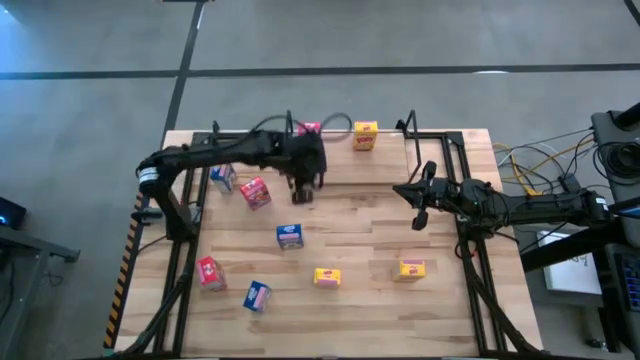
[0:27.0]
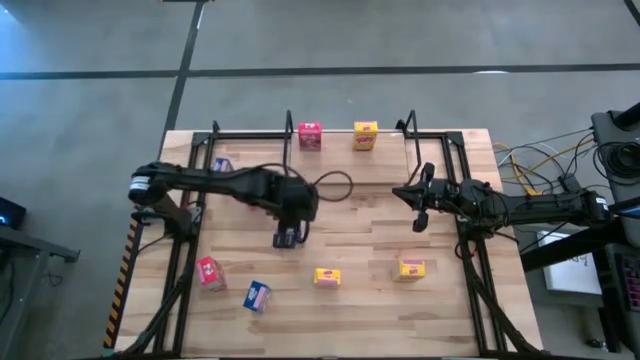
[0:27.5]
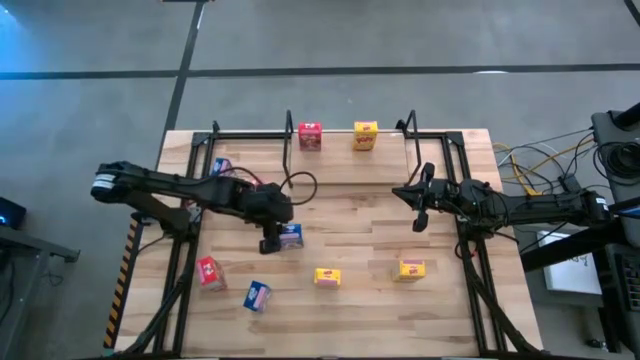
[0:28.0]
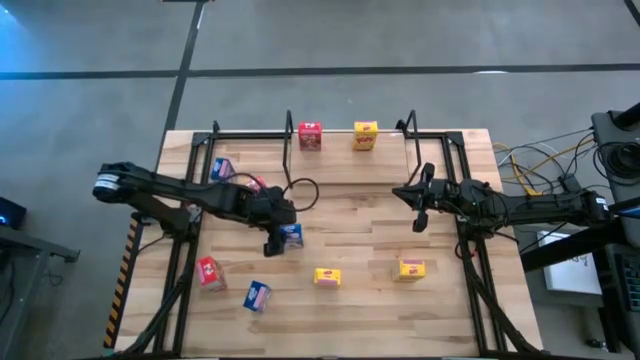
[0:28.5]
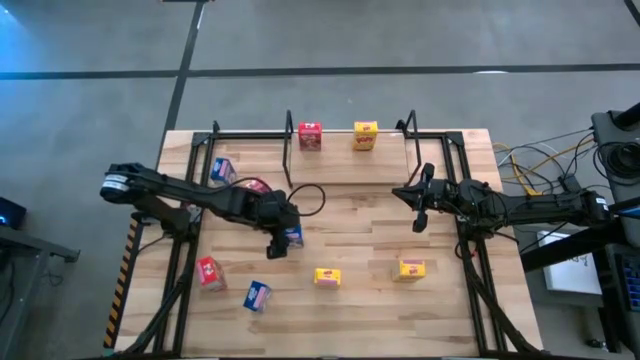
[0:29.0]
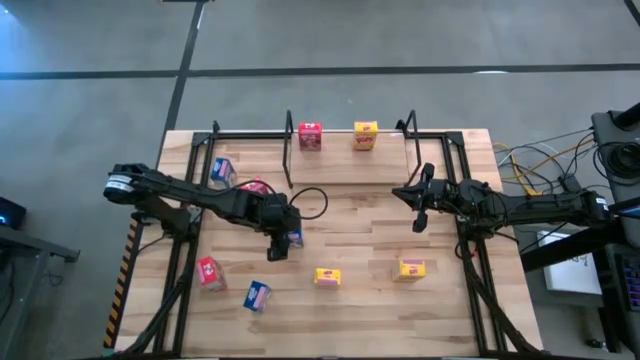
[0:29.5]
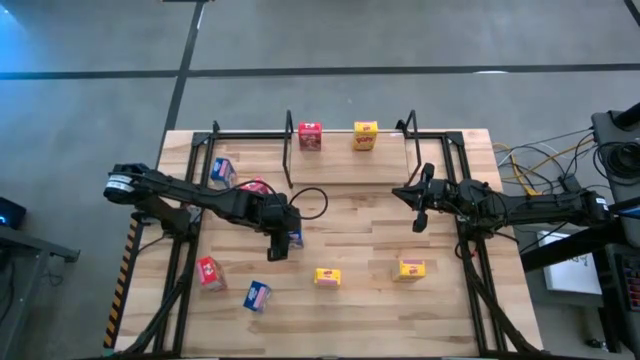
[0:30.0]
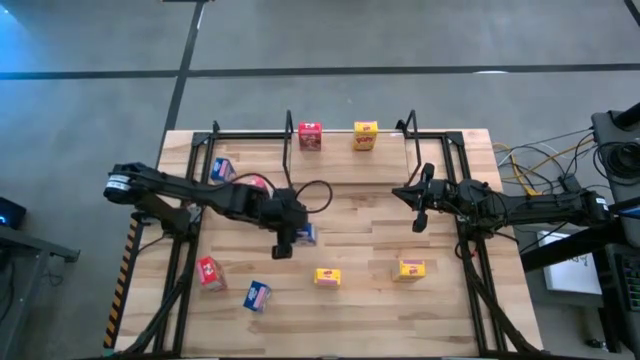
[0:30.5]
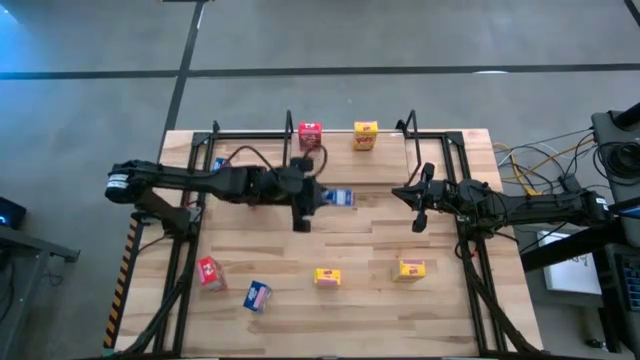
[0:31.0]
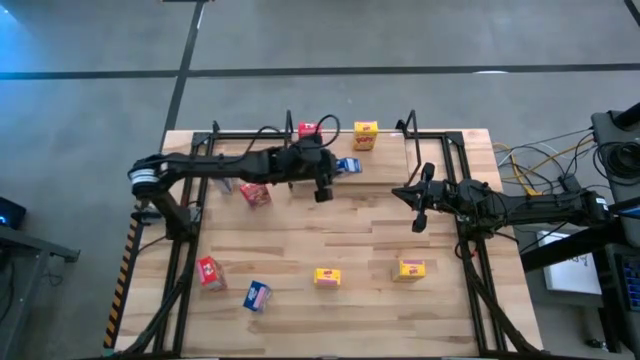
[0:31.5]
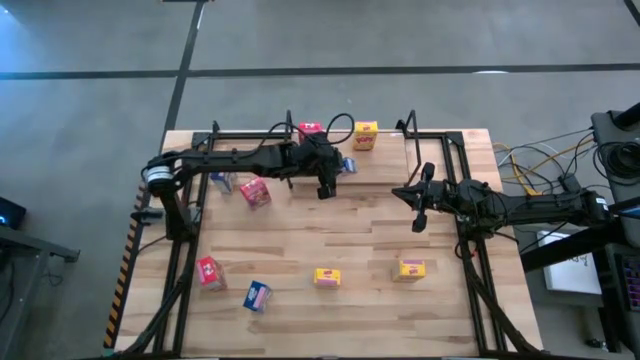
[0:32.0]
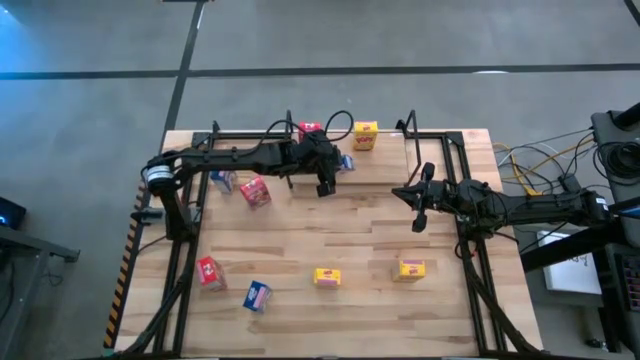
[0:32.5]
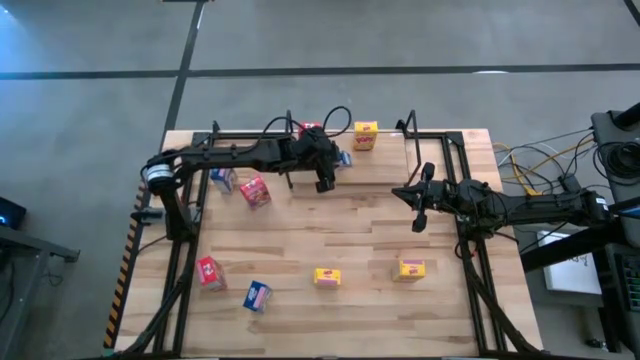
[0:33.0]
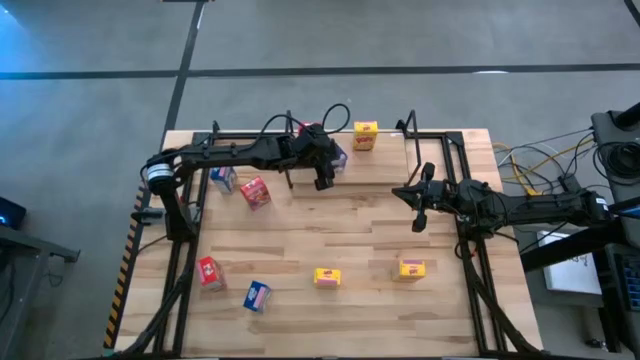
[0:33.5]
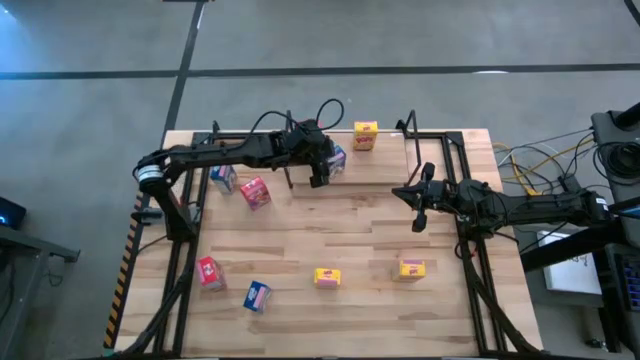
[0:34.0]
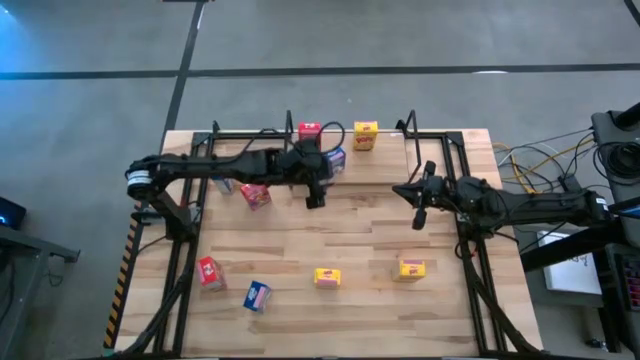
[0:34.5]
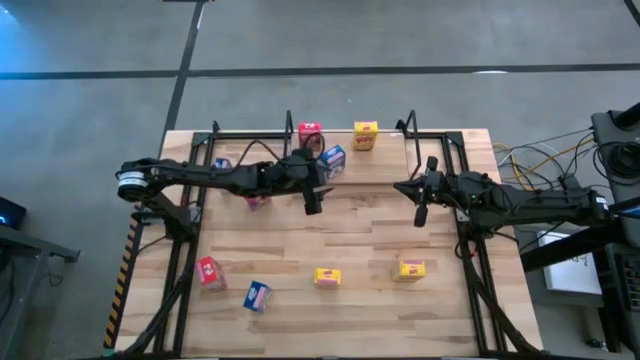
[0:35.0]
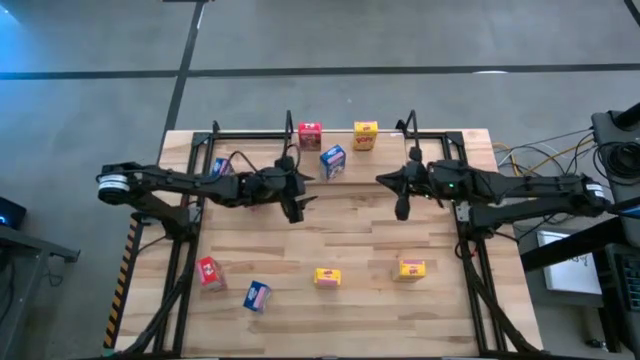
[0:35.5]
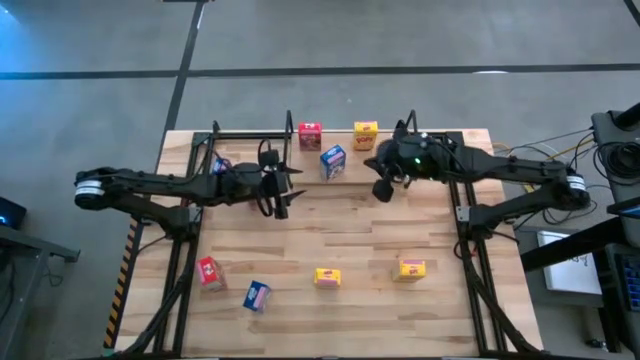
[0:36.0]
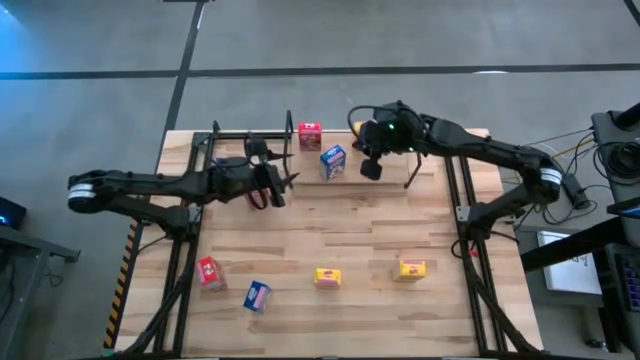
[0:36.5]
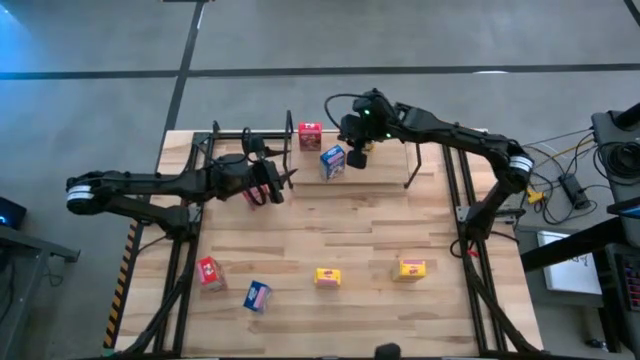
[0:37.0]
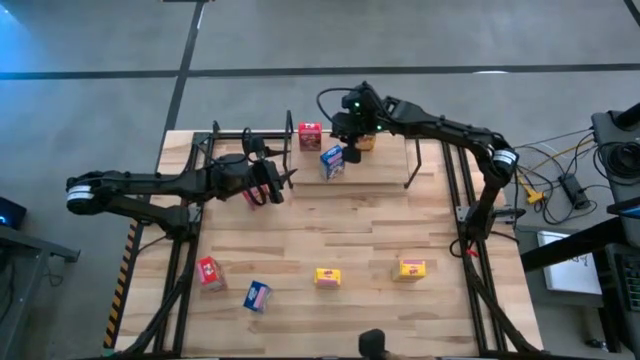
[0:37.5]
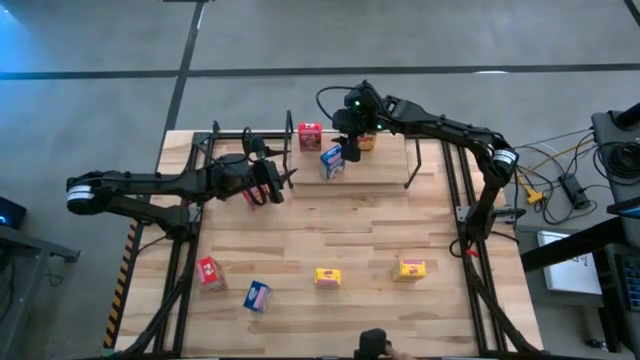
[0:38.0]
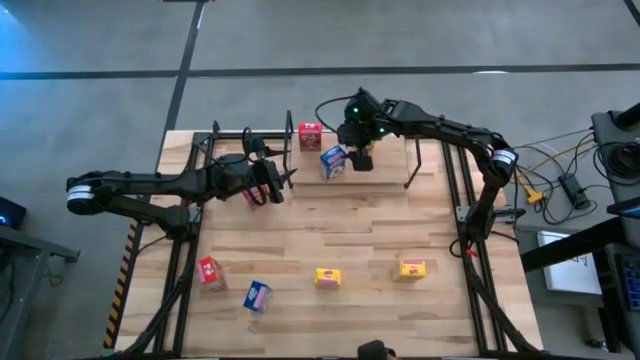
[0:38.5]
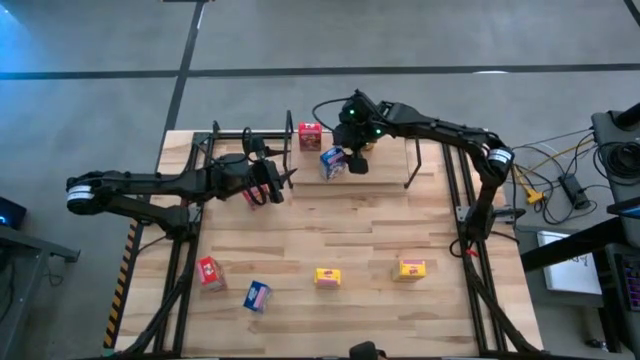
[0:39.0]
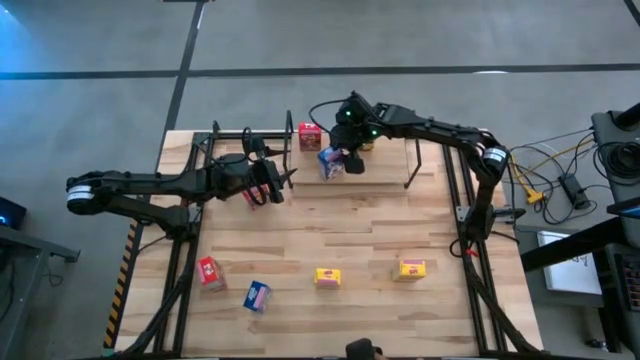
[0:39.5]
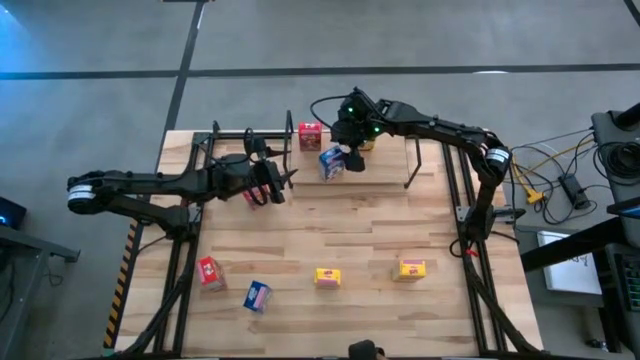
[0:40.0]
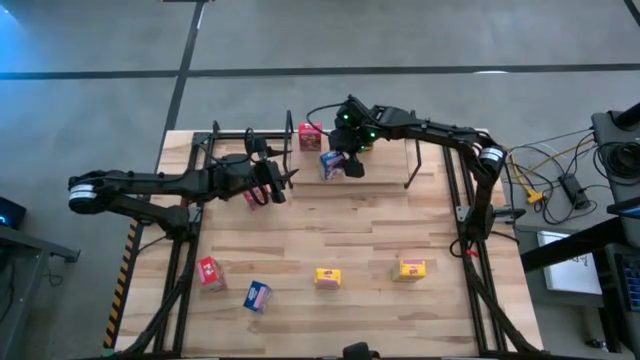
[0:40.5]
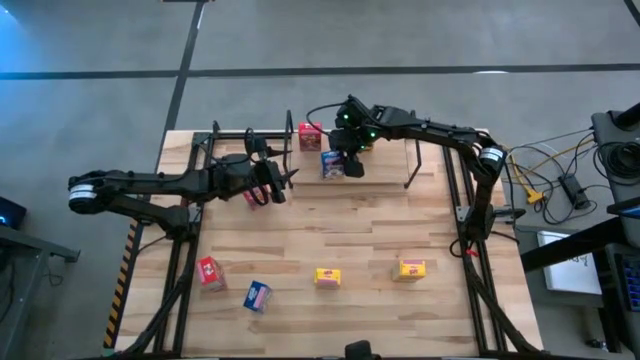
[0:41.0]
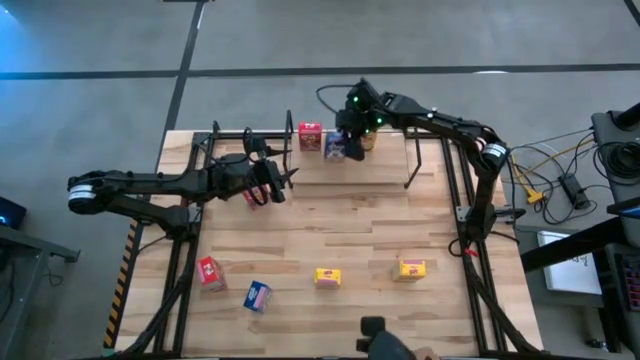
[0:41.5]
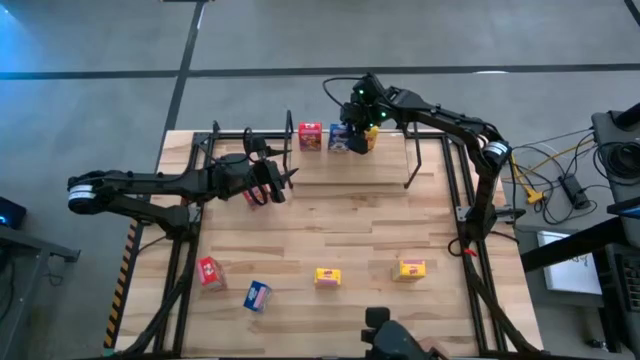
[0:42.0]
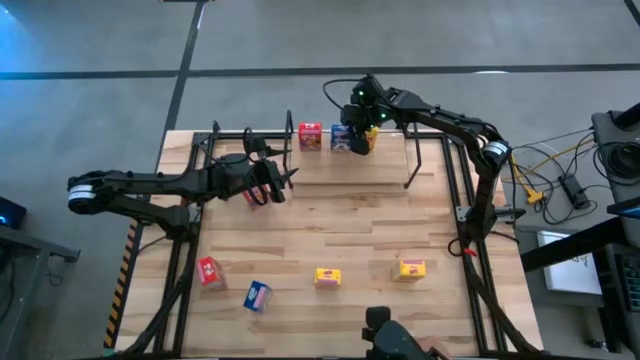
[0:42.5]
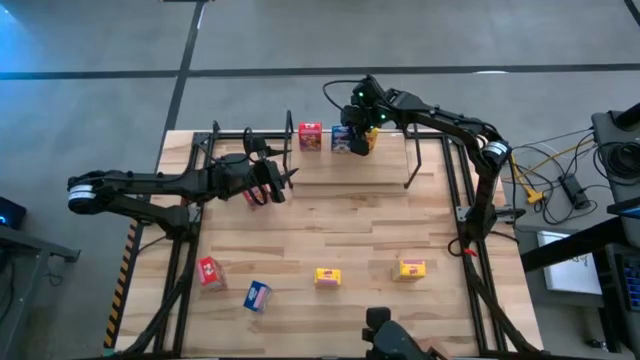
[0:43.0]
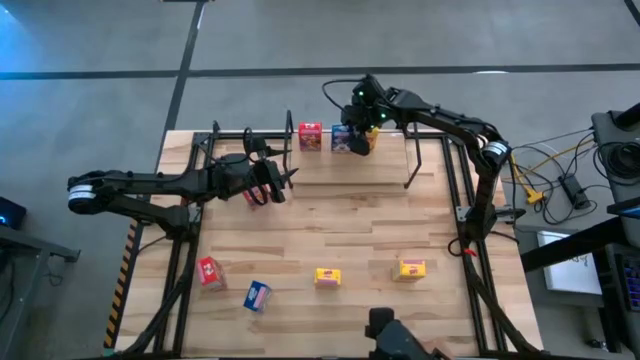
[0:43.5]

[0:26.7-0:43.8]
Task: Stack cereal on shelf
Put the right blue cereal box on the shelf

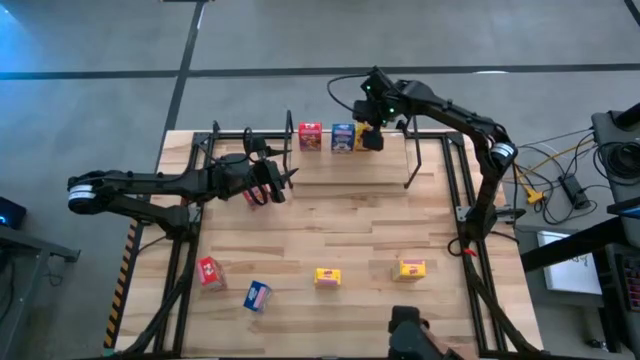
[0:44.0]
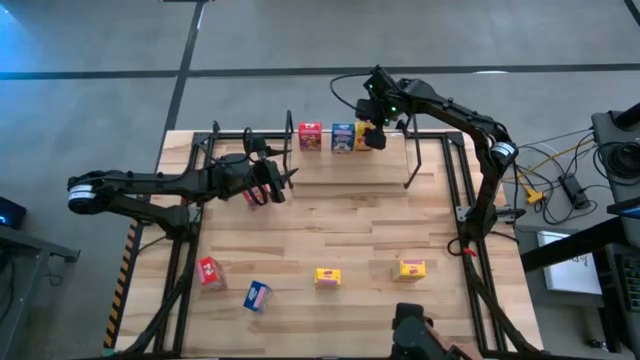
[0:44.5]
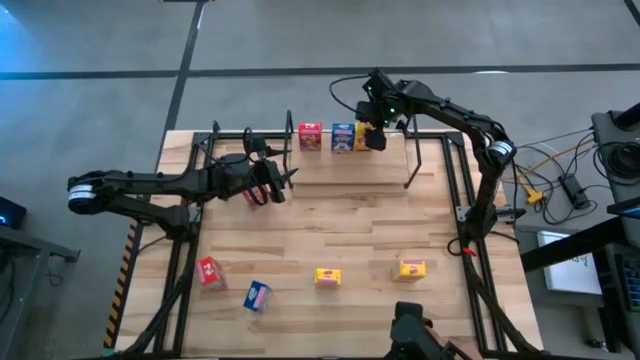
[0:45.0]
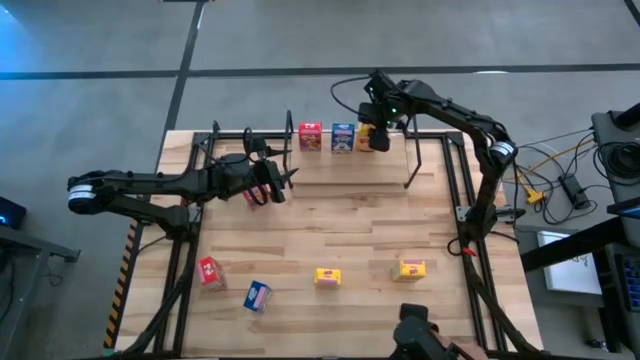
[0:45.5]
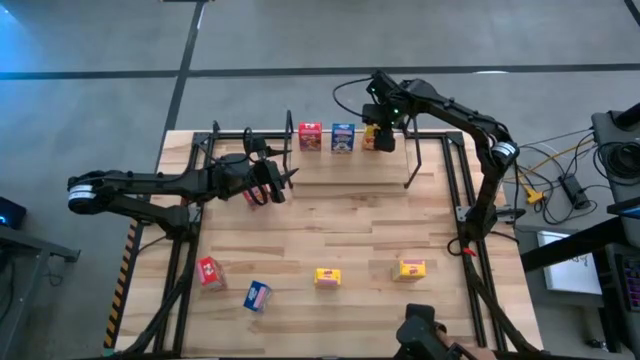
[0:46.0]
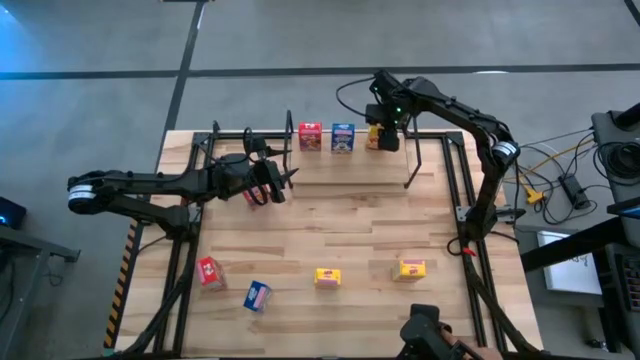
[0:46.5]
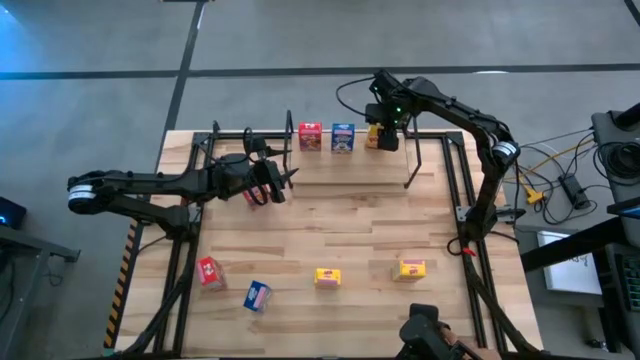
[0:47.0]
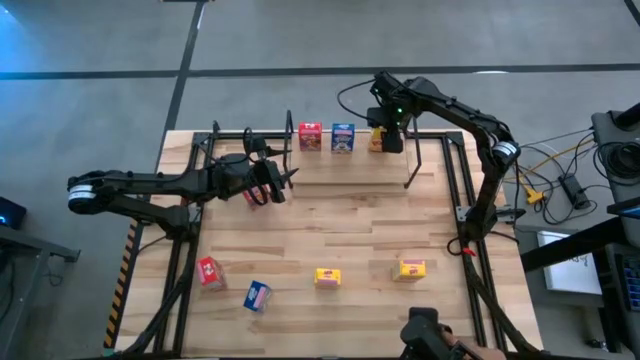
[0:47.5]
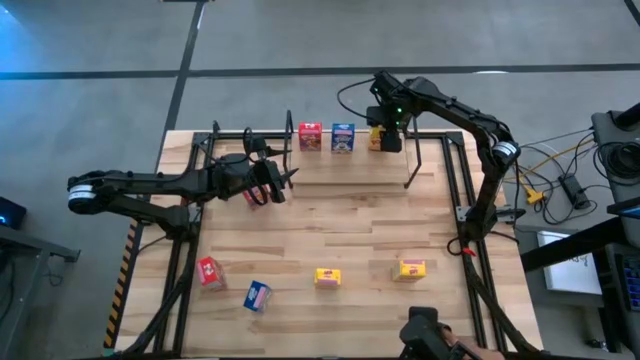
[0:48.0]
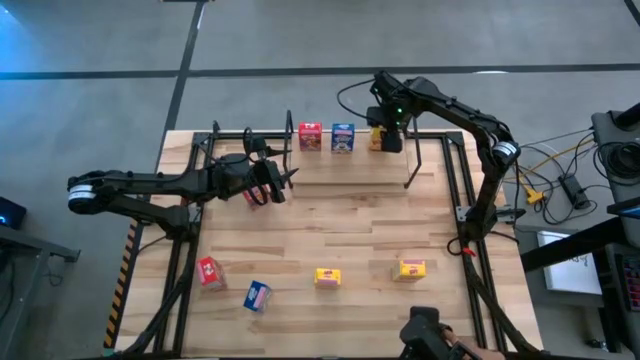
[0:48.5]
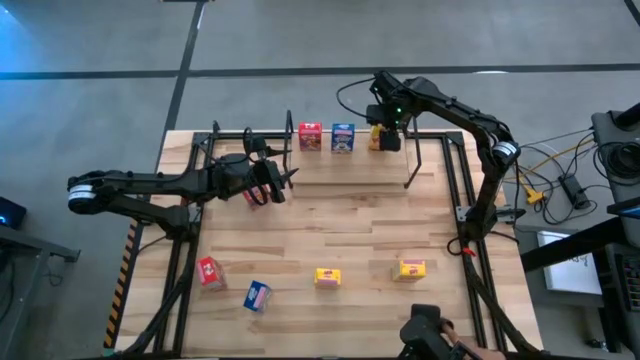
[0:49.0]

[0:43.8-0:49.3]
Adjust the yellow cereal box on the shelf
